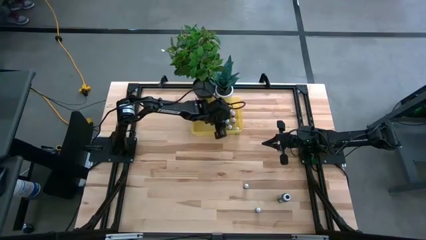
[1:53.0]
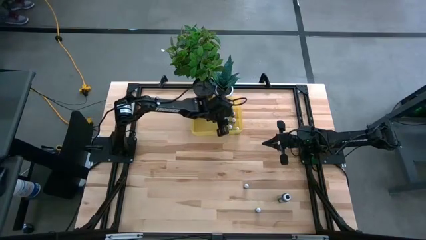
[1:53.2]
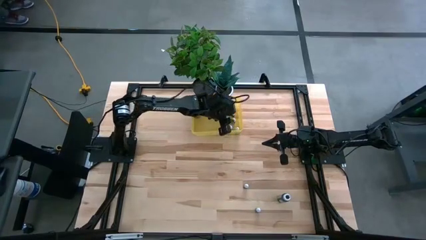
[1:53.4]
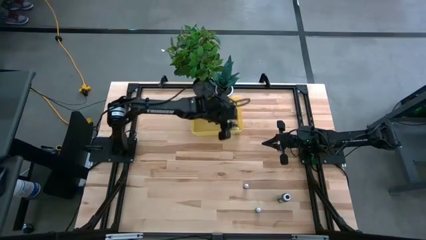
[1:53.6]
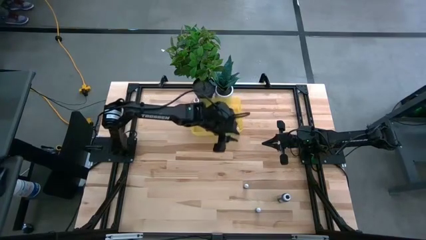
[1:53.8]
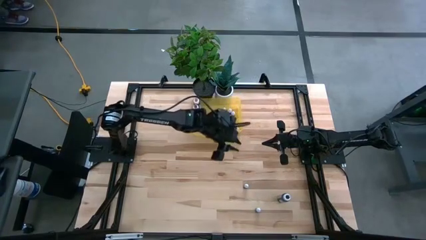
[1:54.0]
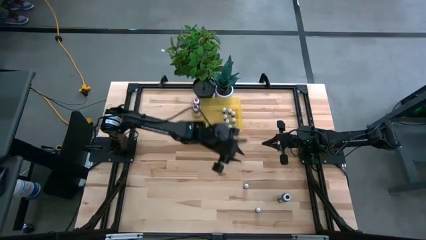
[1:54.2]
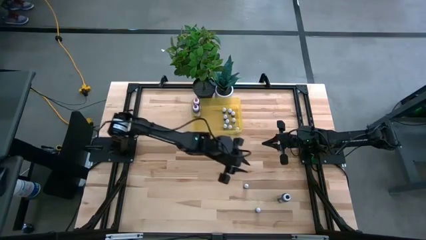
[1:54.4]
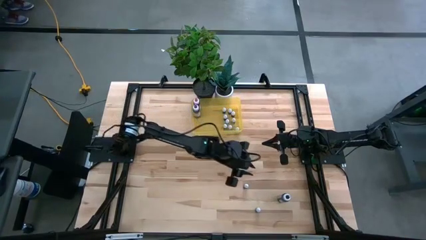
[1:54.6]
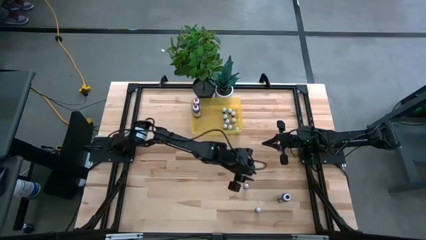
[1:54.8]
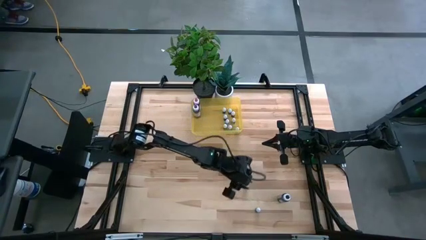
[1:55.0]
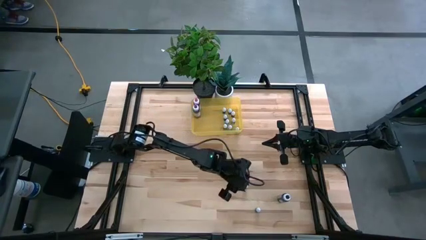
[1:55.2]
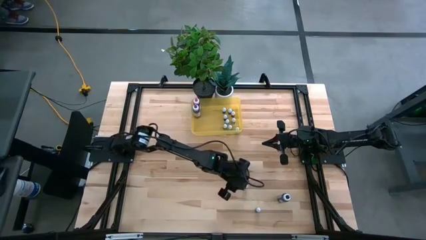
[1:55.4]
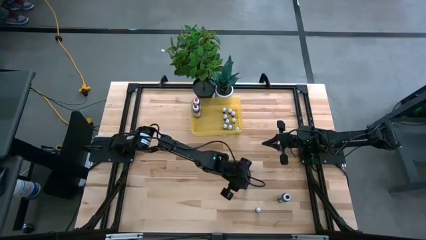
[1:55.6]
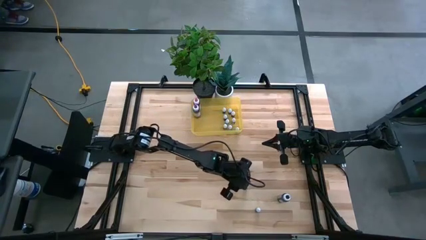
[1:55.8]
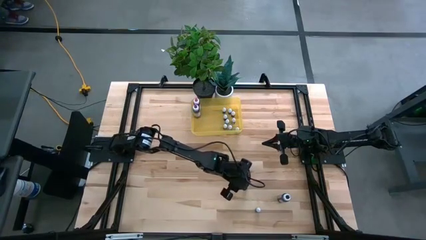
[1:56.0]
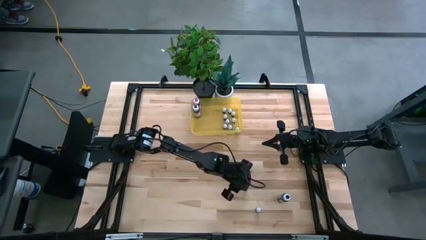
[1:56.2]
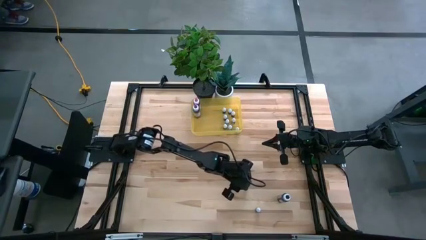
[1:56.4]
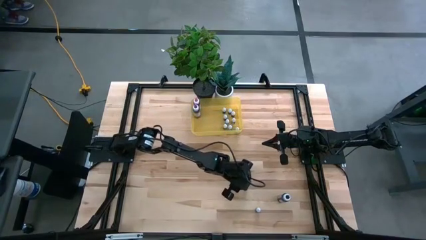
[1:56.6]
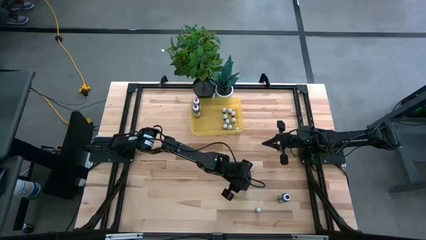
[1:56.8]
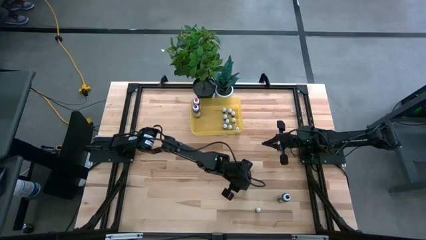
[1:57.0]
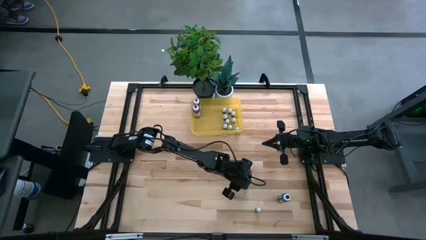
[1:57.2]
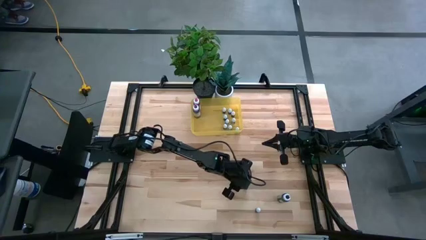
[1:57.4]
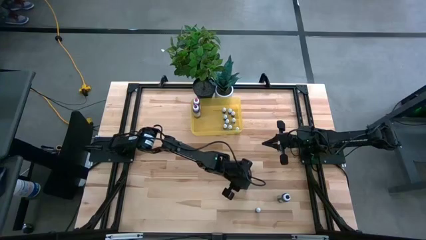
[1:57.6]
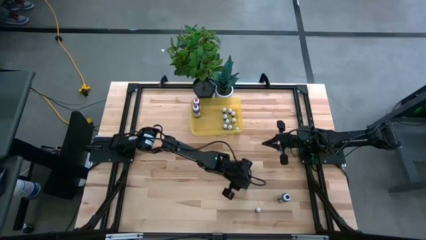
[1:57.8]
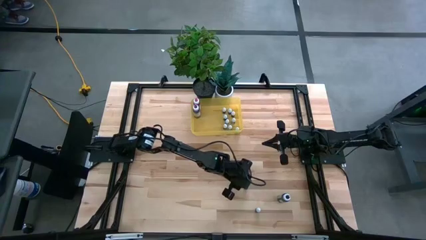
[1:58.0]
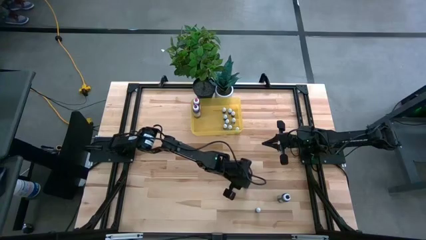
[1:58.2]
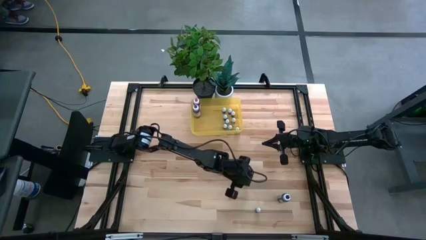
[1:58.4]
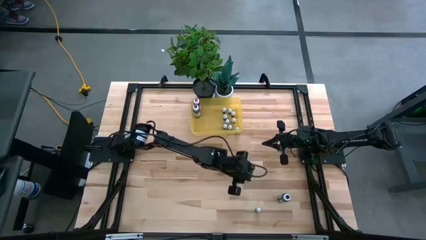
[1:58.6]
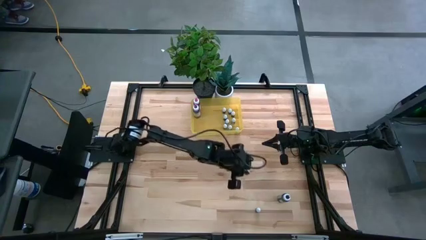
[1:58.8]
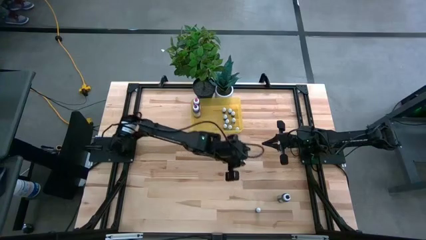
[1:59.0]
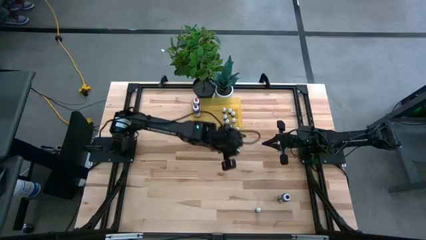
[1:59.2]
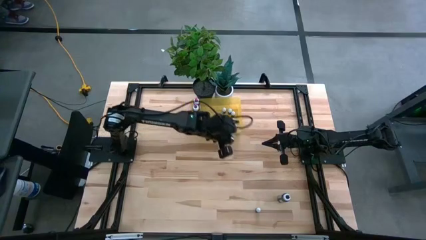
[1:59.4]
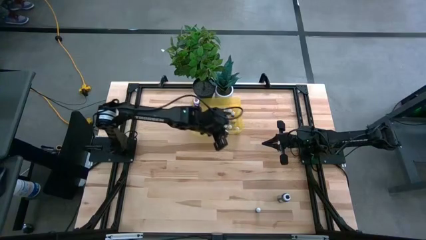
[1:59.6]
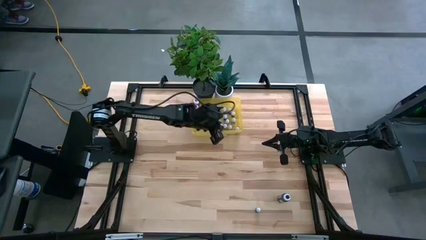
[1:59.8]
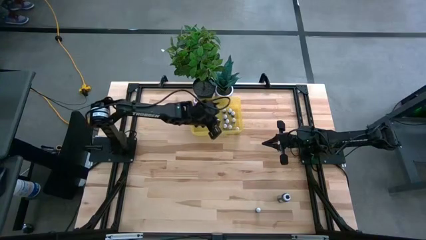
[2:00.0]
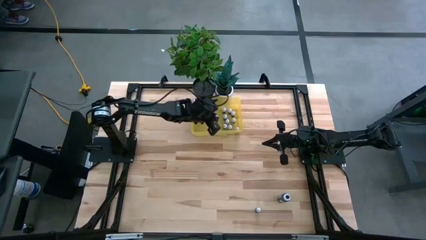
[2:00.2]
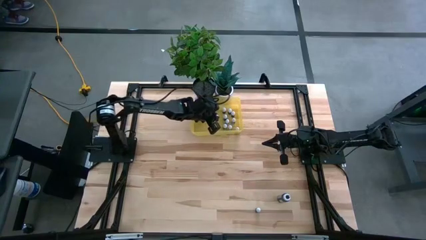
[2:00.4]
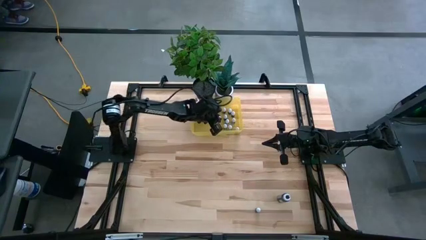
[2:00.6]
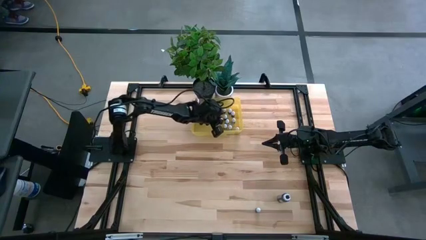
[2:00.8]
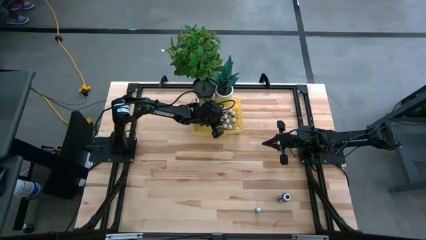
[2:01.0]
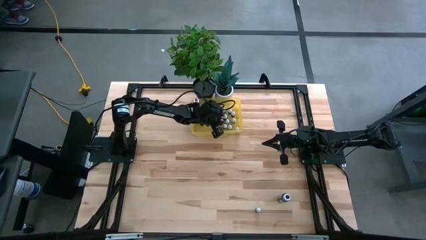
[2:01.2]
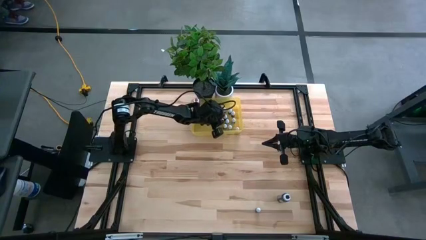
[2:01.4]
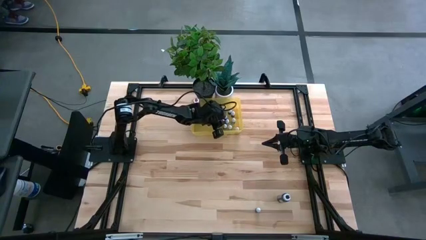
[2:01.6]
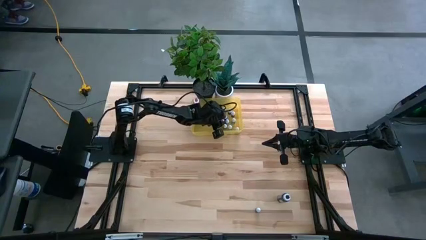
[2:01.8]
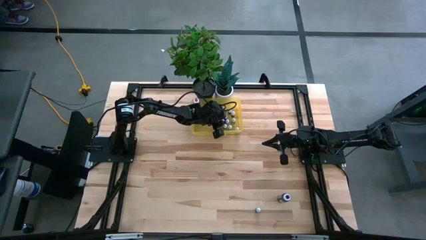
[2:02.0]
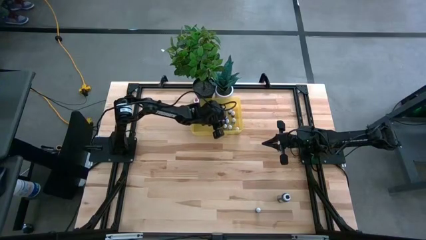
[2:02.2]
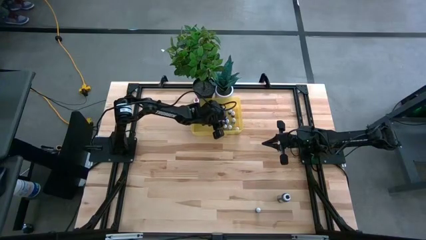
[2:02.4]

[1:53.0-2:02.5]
Task: Pick & Place food coloring
Put the small brown food coloring bottle into the yellow bin

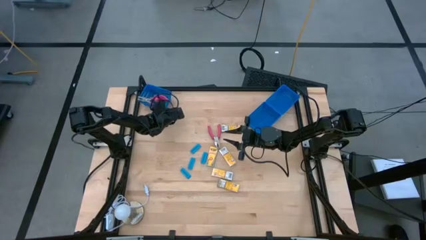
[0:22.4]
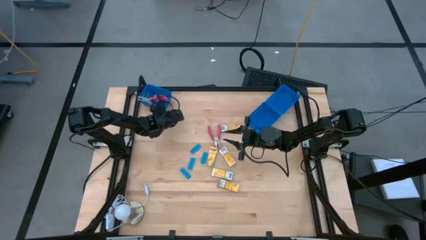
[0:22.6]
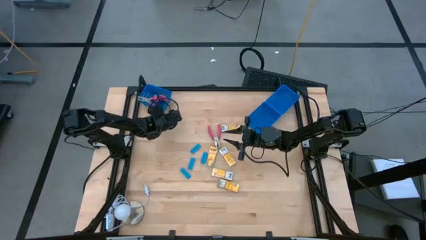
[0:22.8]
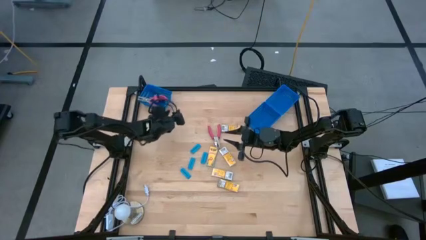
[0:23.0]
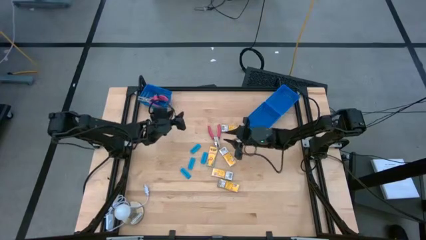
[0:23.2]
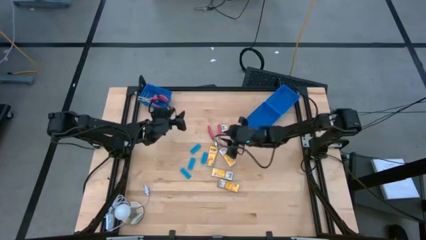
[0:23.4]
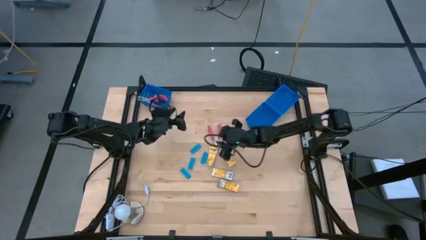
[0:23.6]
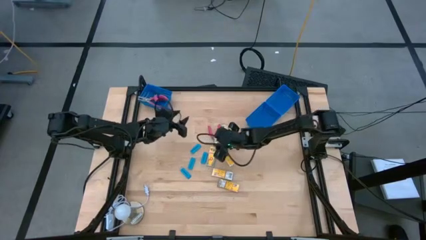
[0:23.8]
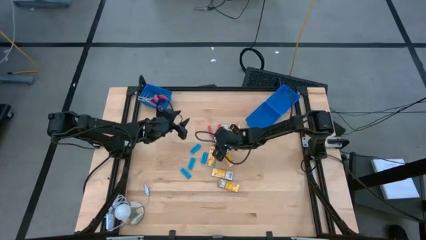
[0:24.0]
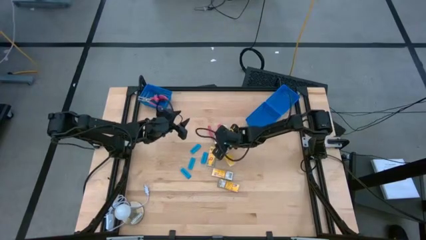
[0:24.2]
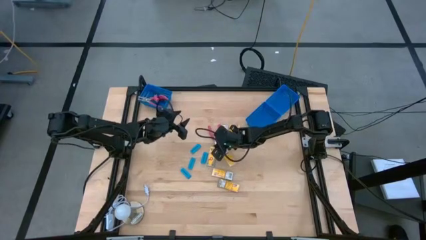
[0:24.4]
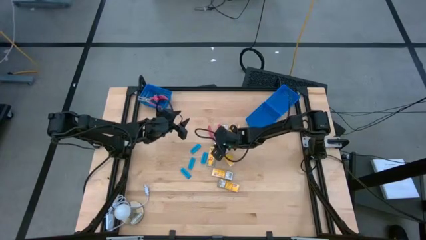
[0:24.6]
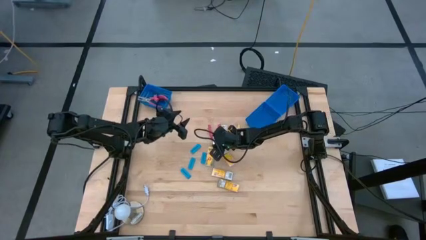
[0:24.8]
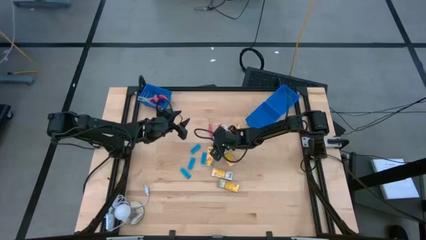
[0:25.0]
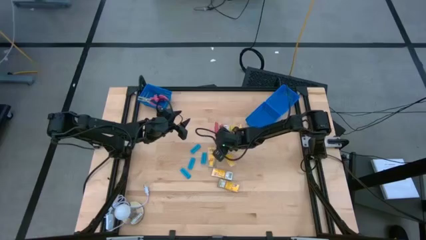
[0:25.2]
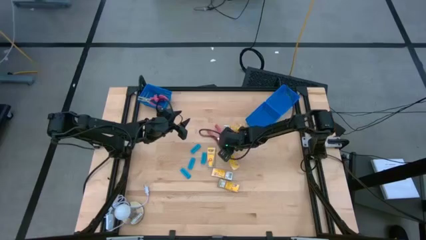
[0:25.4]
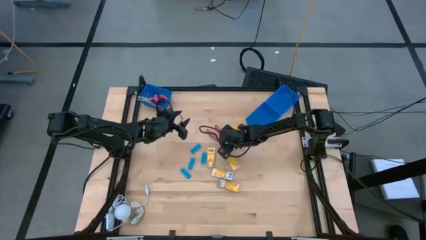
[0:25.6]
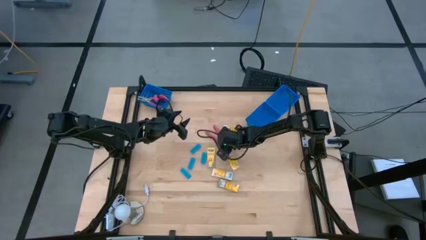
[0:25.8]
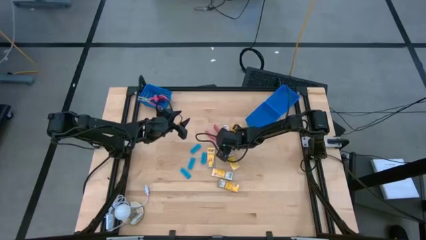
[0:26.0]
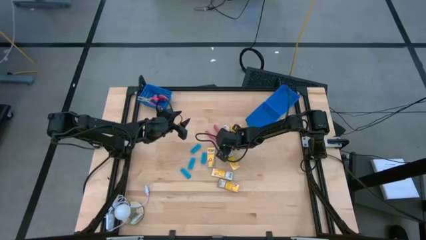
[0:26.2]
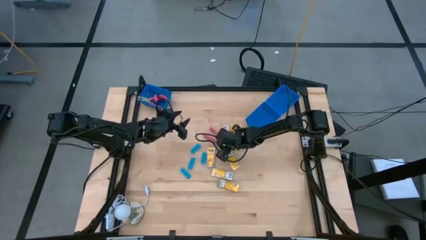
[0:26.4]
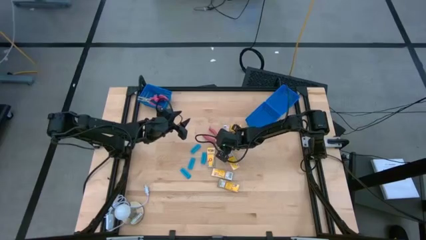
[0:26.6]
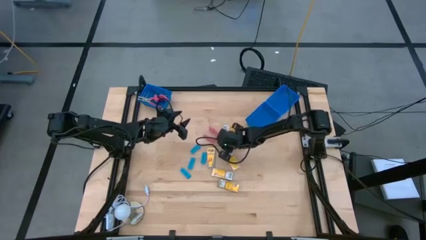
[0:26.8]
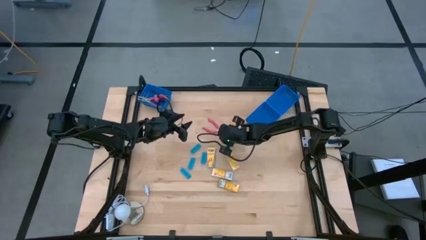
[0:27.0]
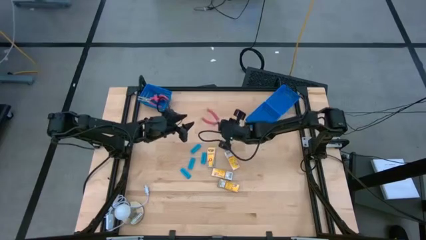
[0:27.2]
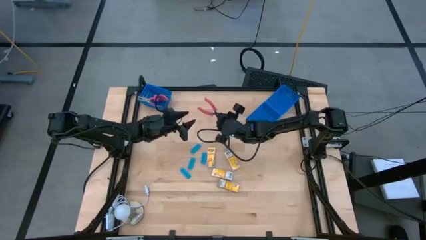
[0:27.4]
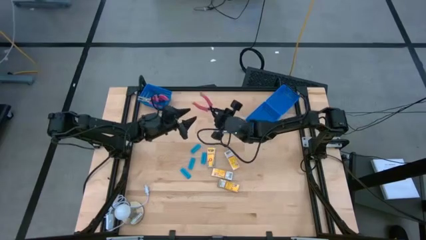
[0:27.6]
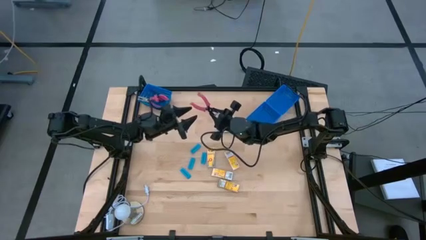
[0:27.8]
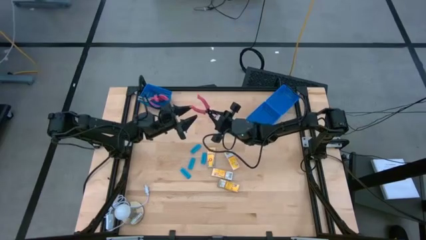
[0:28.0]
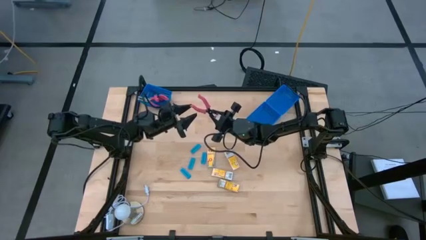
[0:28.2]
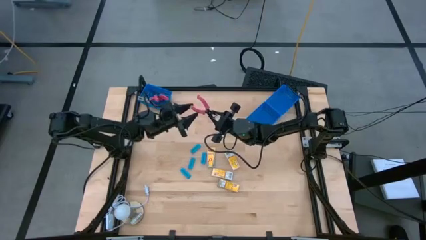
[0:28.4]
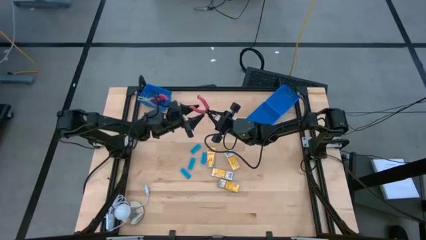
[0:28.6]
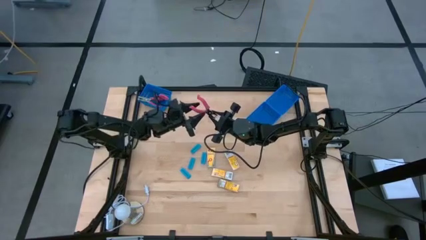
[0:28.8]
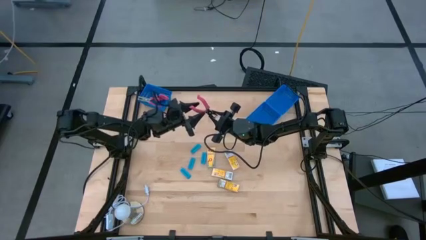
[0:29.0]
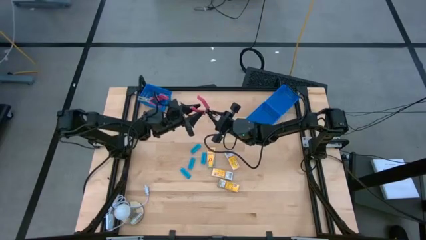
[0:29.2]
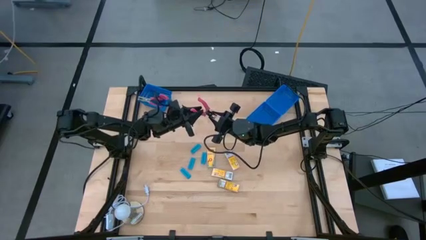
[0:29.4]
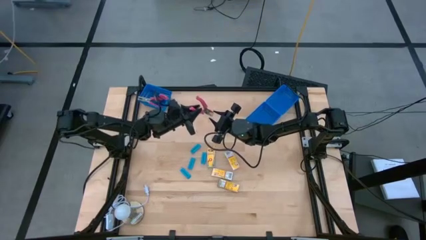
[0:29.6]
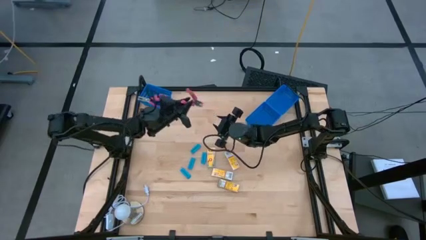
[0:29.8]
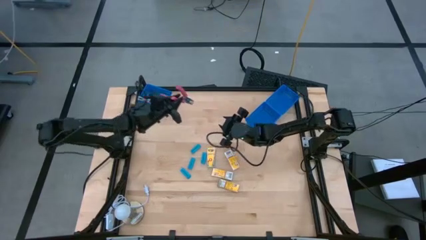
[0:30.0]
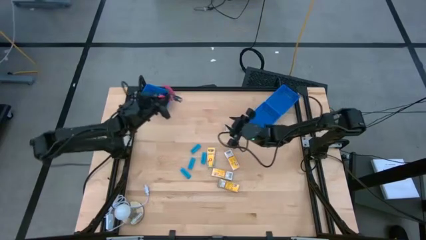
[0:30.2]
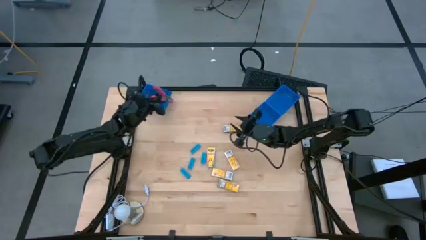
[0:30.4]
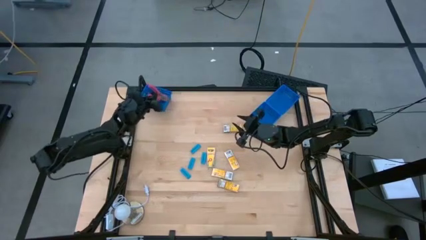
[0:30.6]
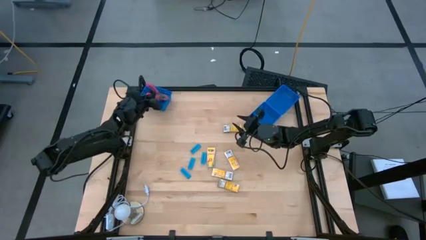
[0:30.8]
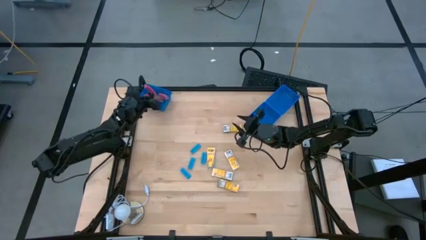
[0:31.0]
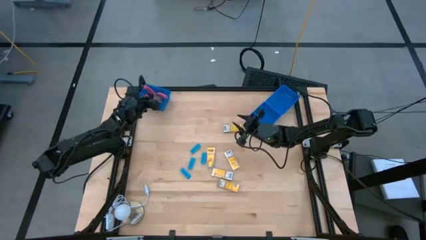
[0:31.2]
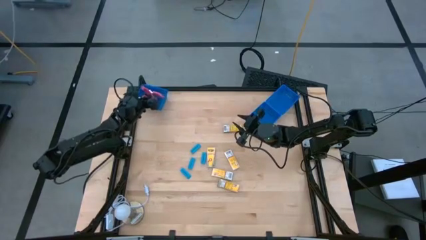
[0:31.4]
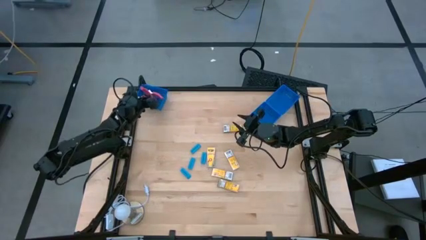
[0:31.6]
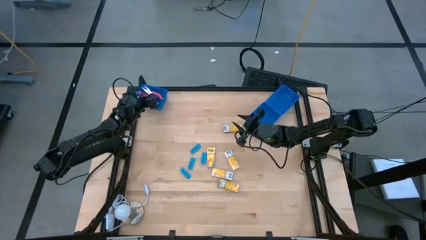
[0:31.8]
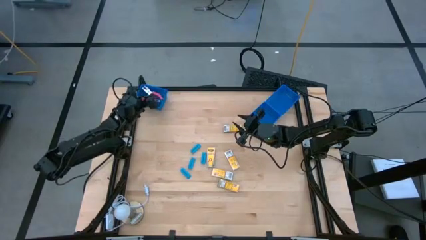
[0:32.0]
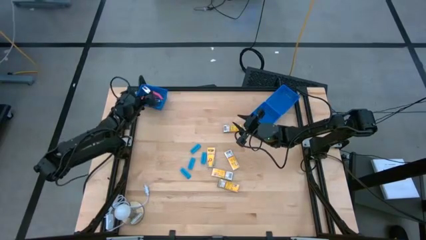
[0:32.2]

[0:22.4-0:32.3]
Task: Pick & Place School Supplies
Put the red puncher into the top left blue basket
